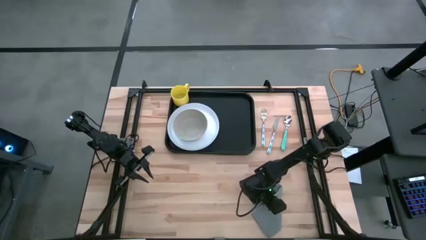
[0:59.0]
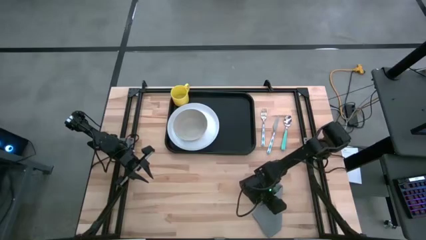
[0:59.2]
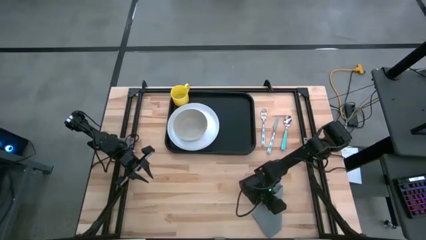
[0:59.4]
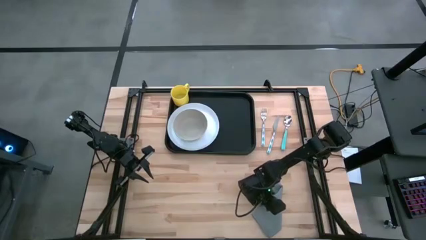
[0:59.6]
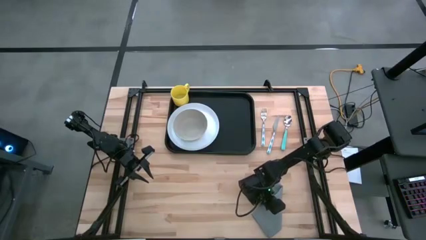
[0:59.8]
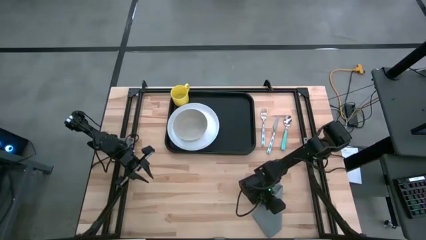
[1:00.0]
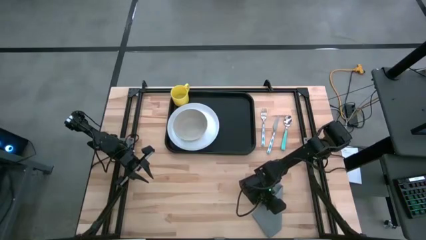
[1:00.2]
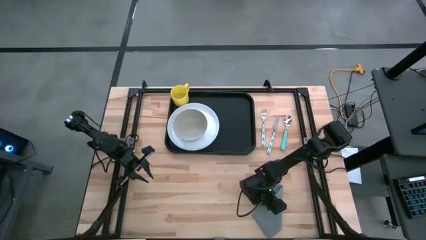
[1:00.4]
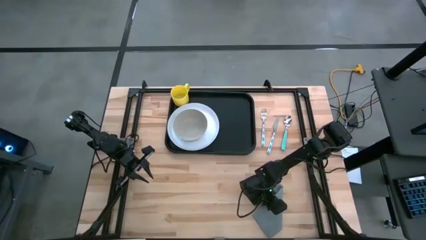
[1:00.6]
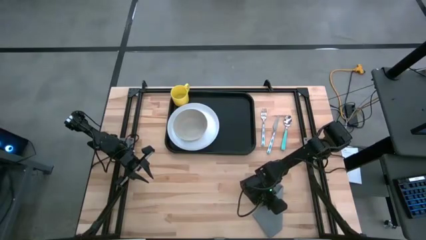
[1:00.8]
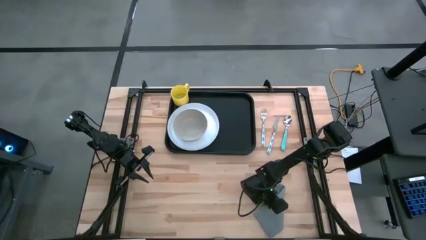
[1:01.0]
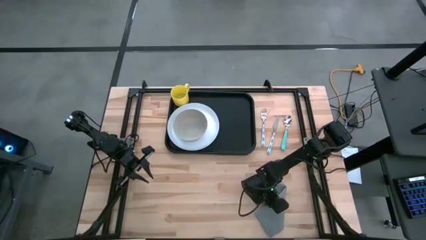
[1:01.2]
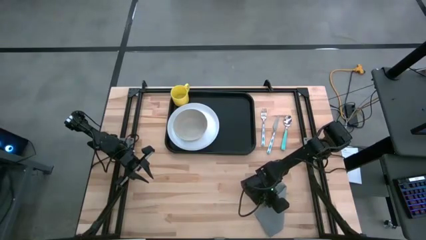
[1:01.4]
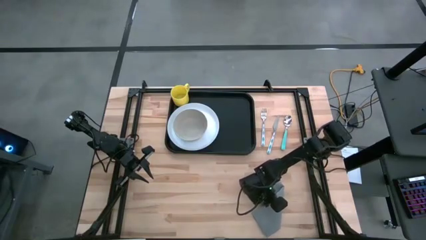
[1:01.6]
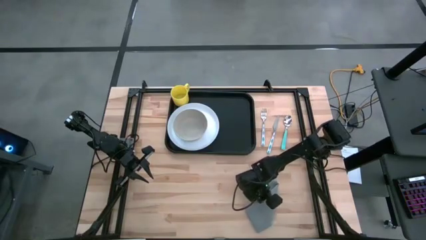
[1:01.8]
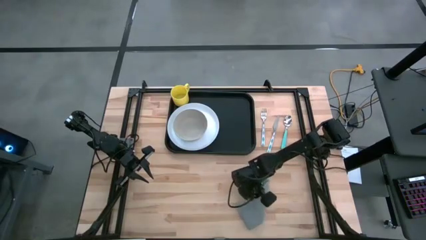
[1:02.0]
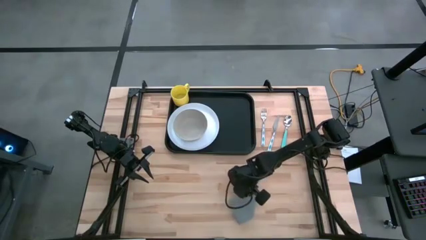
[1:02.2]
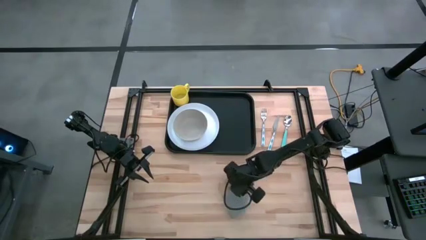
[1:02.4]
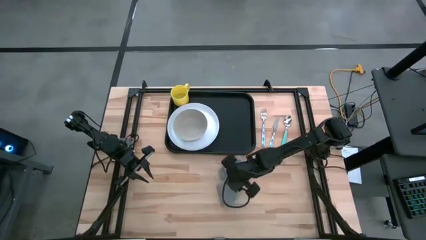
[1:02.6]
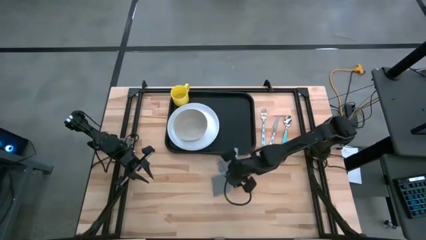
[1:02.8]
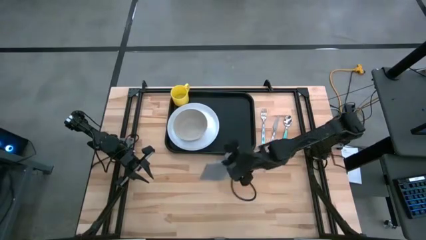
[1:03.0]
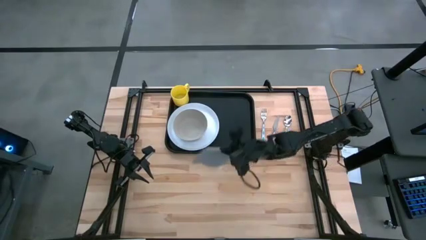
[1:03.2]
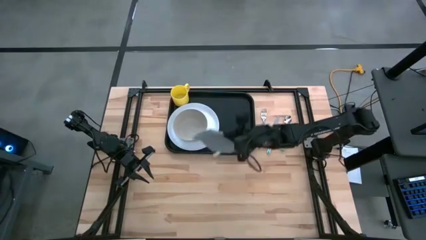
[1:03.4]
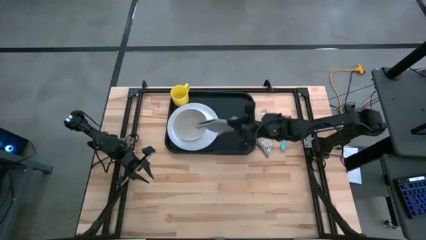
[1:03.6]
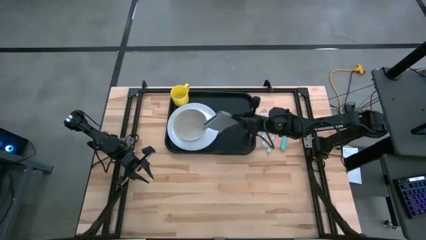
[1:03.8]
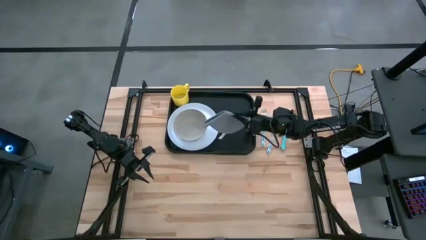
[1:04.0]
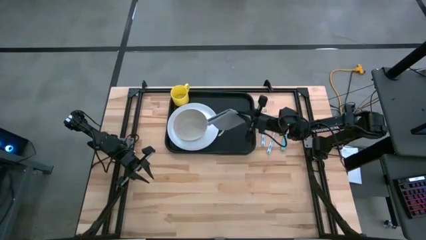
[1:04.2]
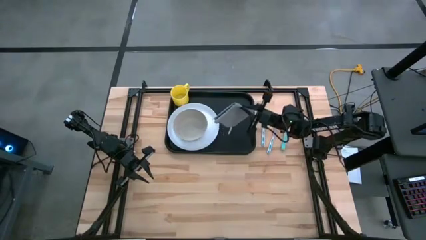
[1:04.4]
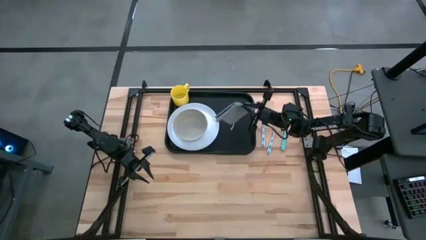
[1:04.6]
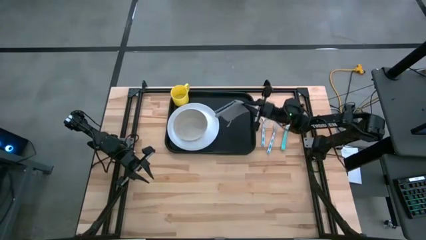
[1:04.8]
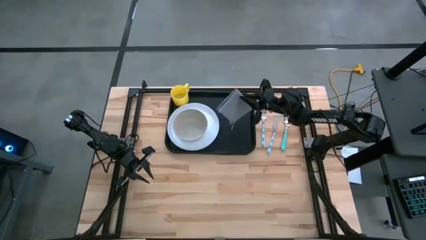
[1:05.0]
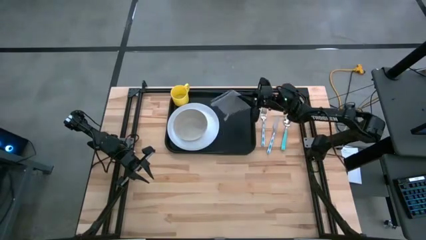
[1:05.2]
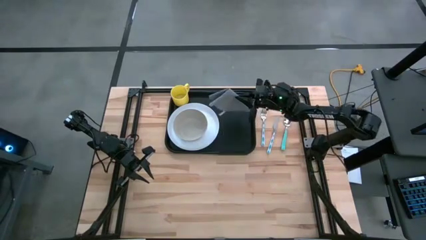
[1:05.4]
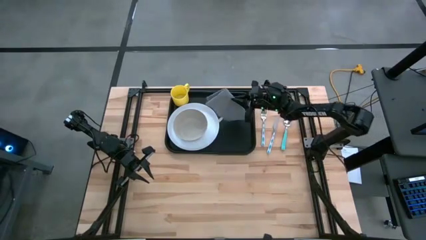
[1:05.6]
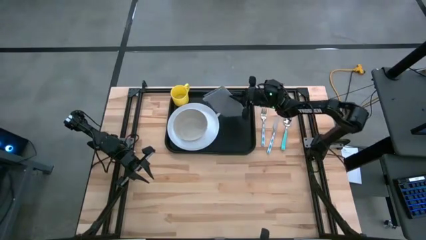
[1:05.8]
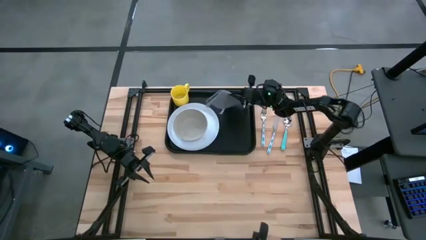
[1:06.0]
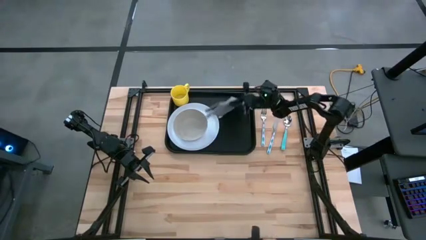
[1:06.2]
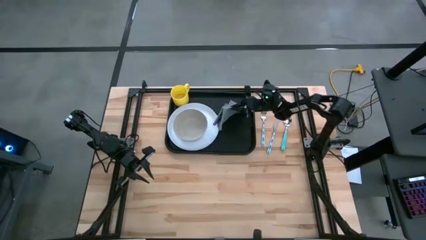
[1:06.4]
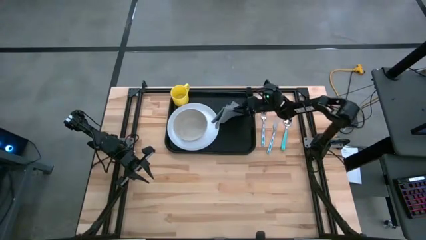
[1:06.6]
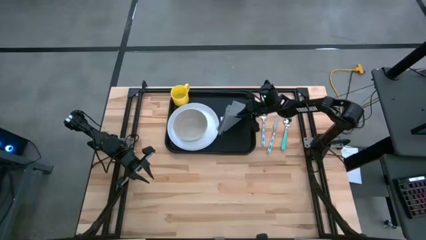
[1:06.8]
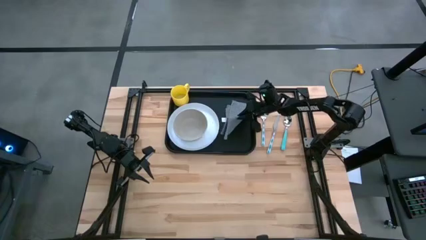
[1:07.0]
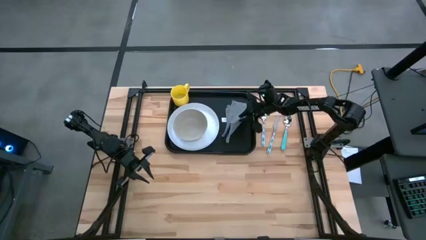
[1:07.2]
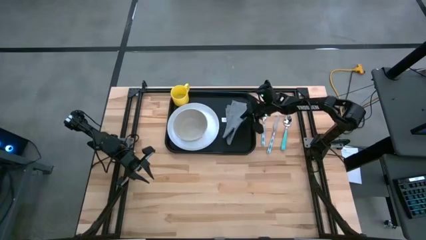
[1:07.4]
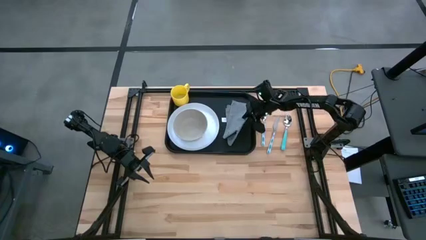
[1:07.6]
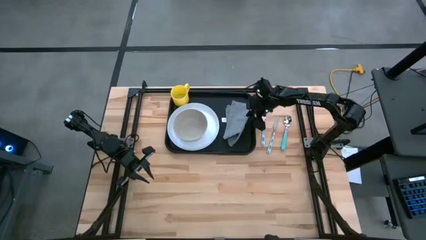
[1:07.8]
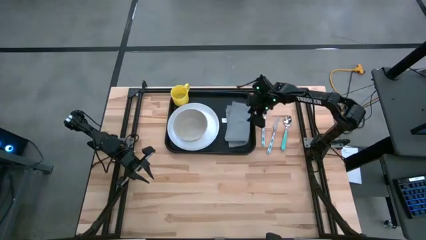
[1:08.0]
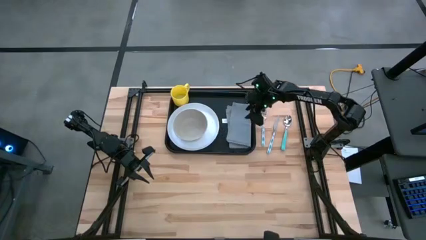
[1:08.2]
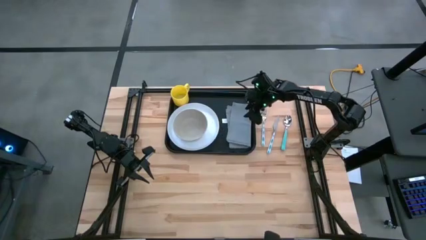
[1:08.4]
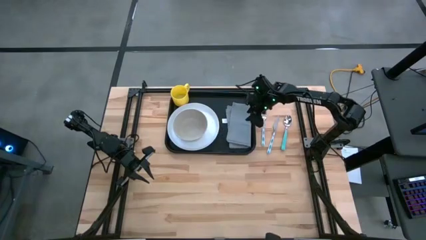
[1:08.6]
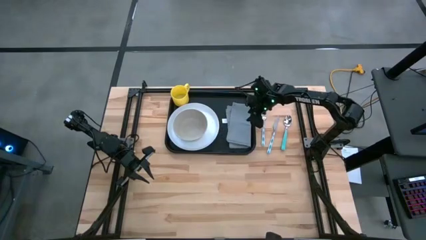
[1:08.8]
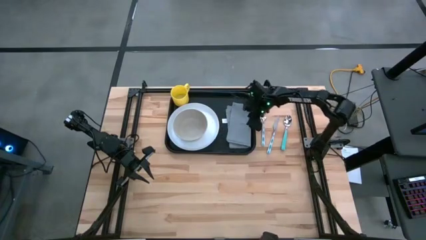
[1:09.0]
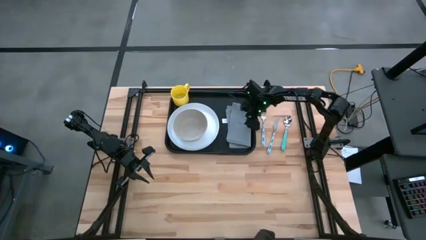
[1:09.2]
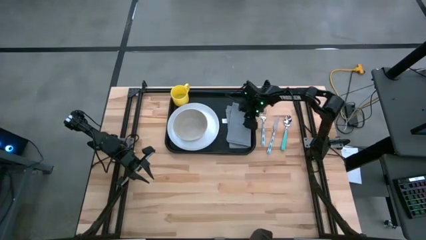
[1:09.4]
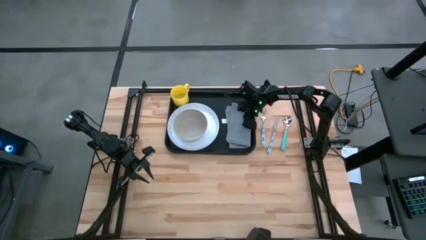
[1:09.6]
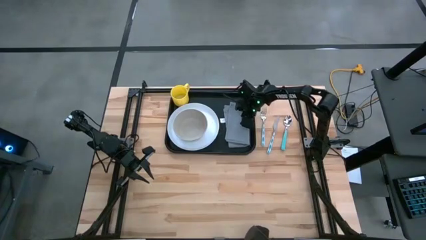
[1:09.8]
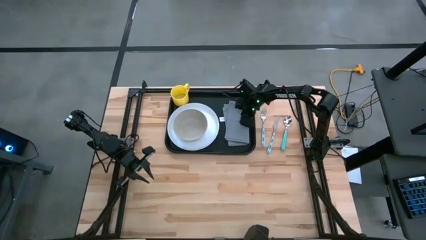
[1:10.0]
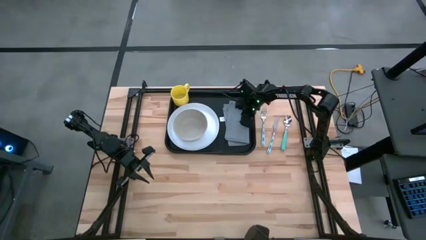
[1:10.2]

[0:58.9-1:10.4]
Task: Set up tray
Put the gray napkin to the right of the white plate on the black tray

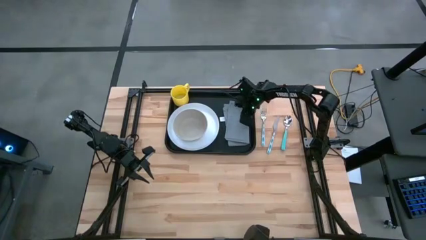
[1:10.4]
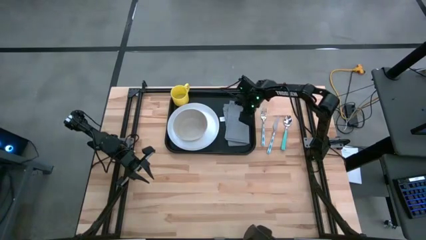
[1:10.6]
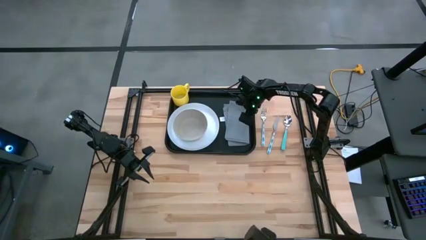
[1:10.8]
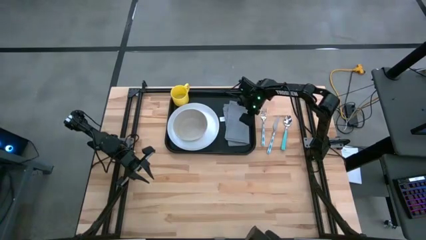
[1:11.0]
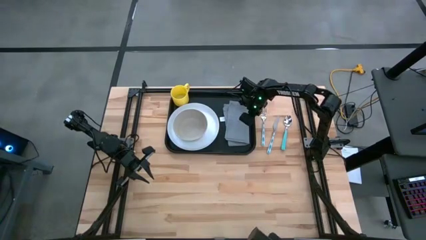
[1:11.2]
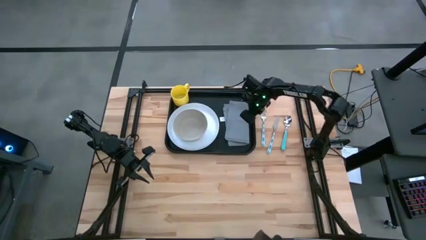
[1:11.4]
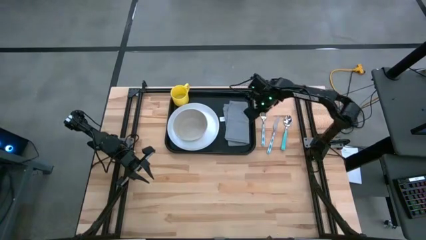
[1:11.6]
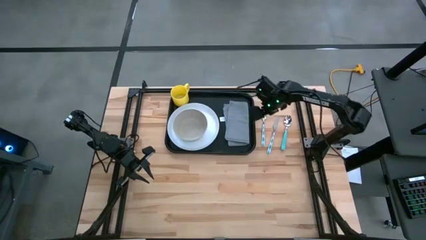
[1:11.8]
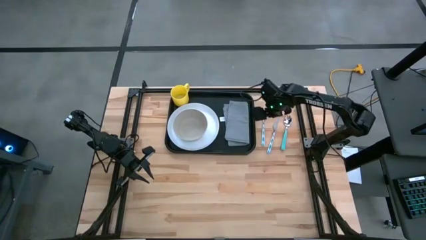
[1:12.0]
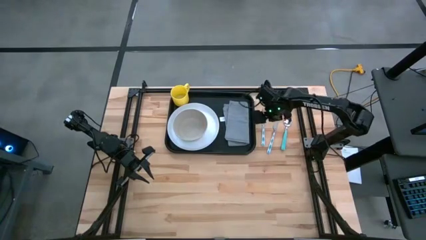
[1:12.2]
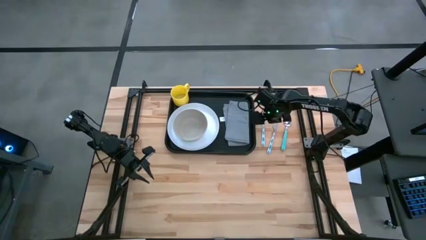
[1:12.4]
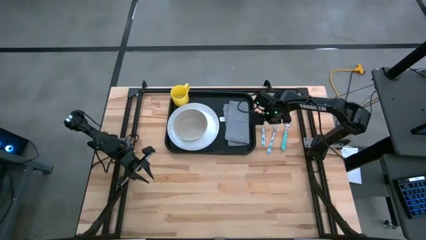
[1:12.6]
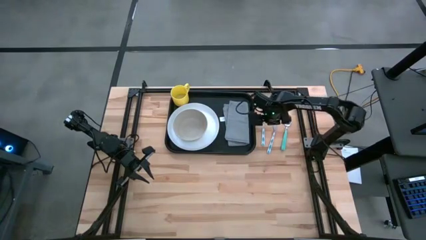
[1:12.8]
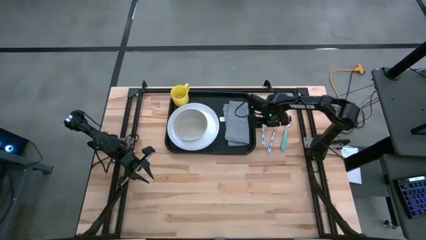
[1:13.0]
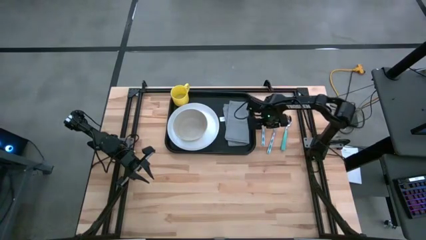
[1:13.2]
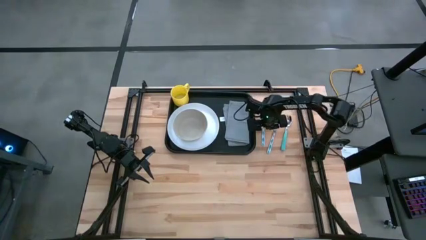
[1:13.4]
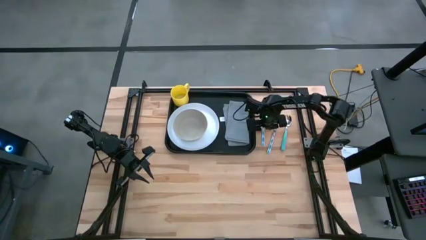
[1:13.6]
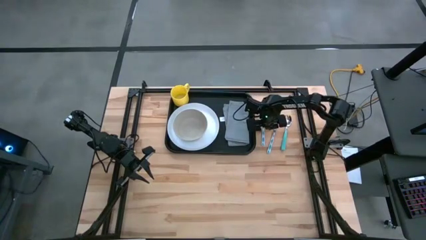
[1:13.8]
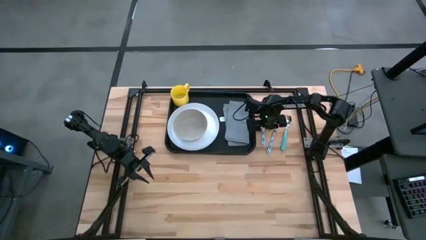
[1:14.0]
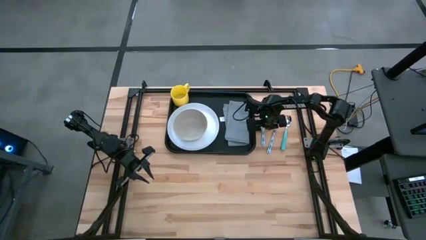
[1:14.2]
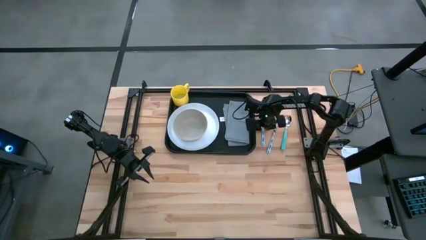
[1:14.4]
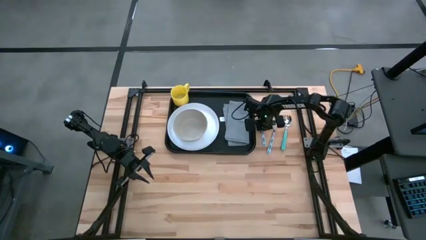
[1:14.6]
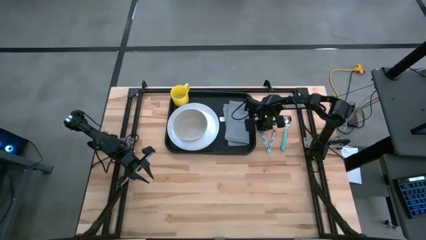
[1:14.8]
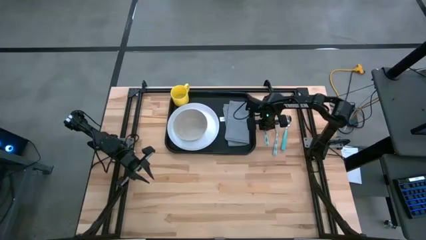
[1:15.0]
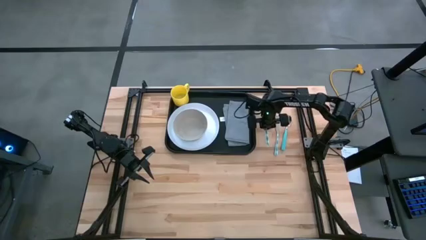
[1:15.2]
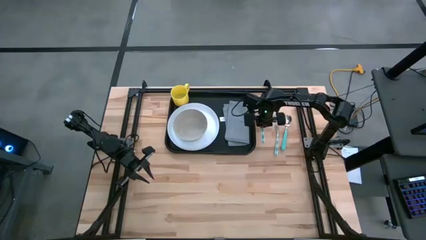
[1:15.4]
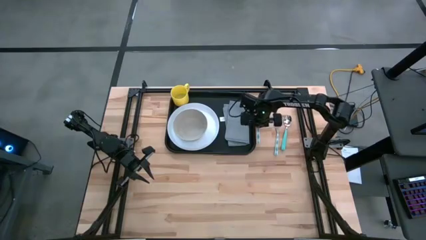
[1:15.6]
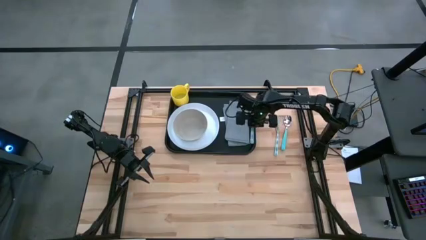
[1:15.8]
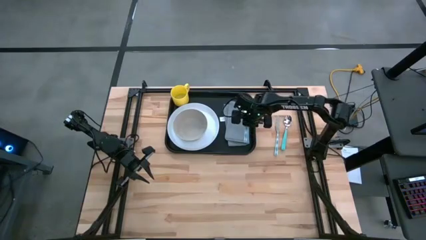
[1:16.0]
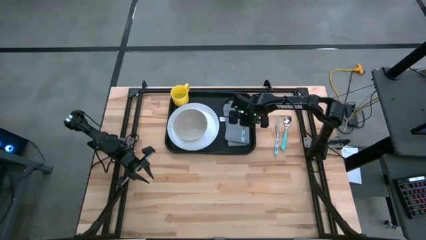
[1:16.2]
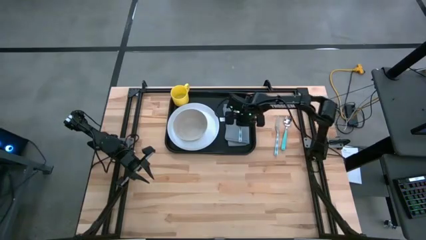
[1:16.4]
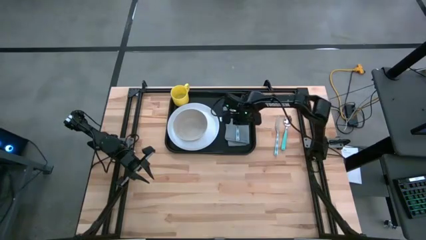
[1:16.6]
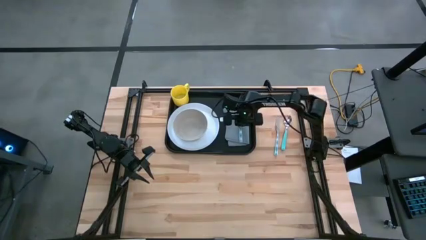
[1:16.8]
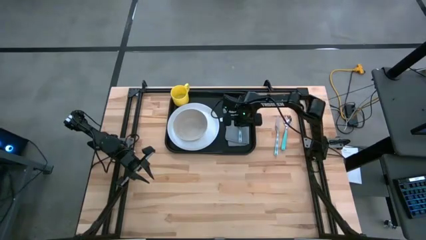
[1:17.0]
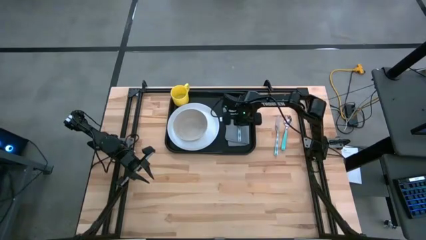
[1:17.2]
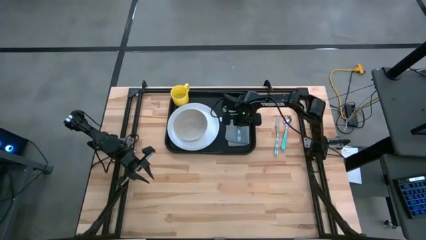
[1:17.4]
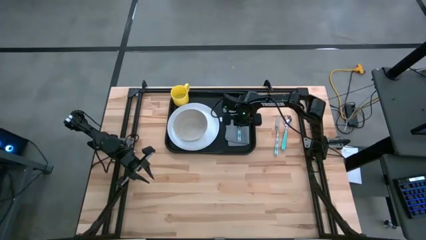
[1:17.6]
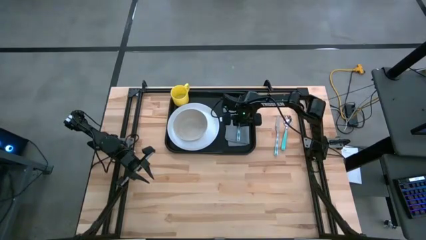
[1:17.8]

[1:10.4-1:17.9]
Put the white fork to the right of the white plate on top of the gray napkin on the black tray
